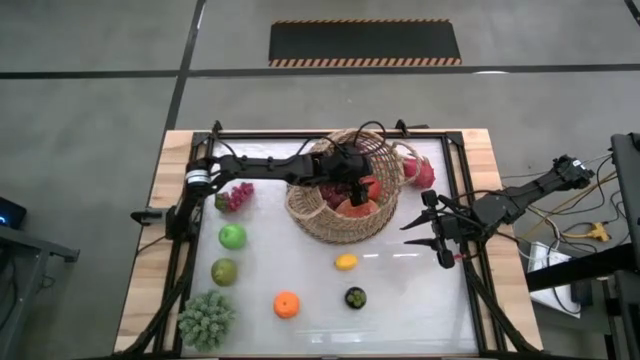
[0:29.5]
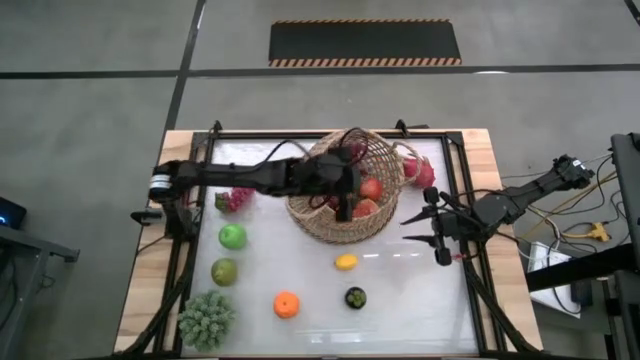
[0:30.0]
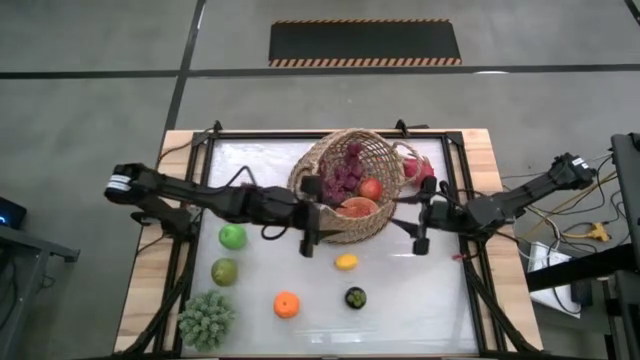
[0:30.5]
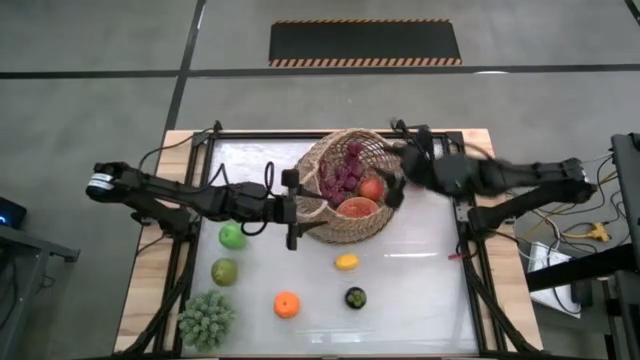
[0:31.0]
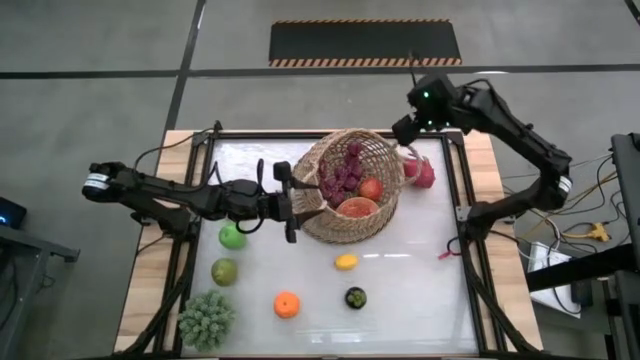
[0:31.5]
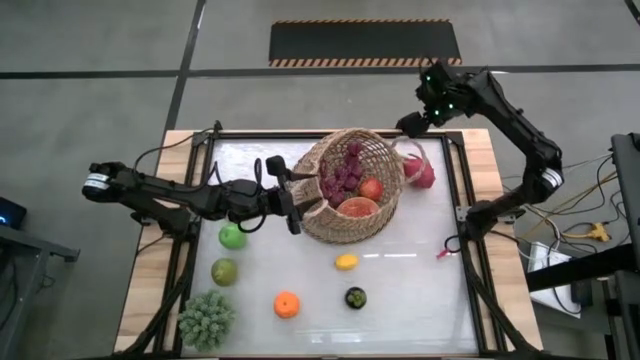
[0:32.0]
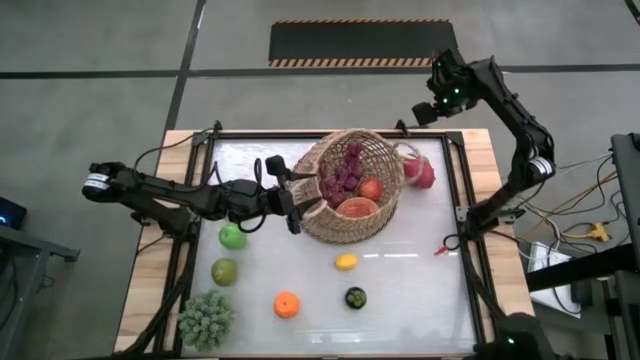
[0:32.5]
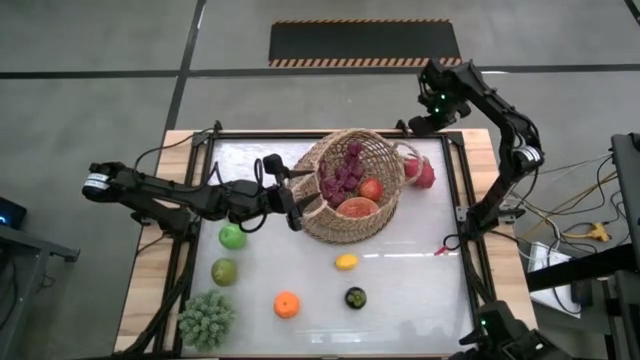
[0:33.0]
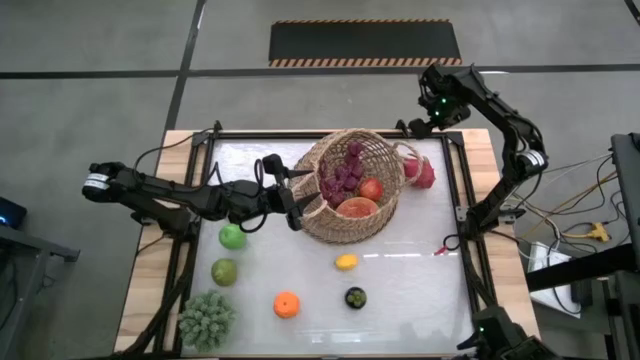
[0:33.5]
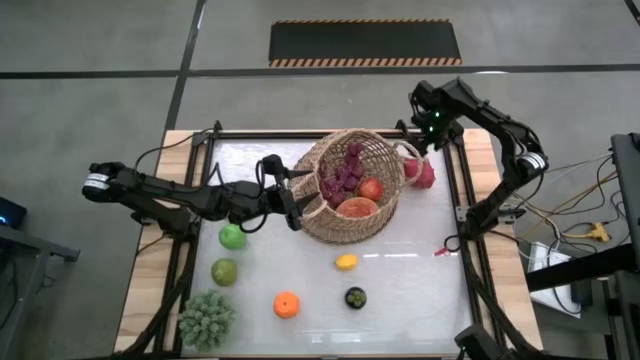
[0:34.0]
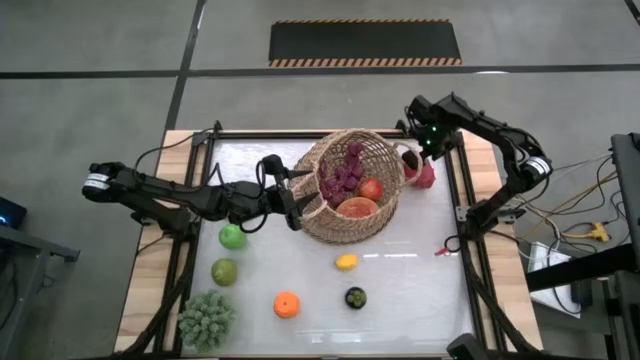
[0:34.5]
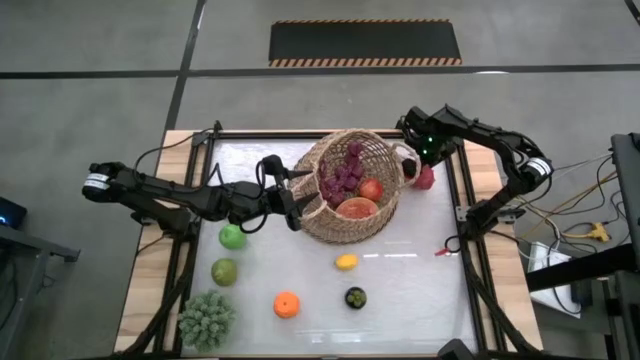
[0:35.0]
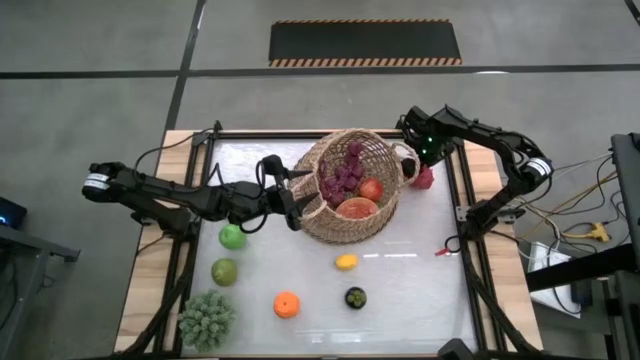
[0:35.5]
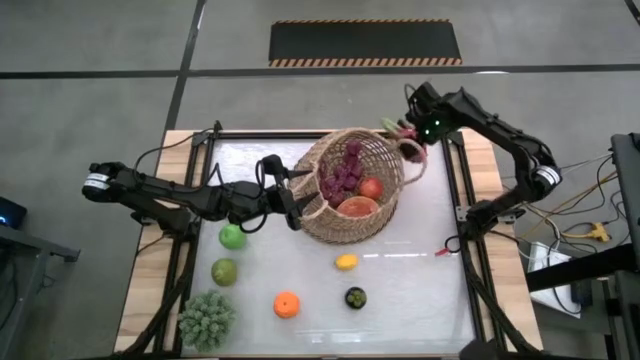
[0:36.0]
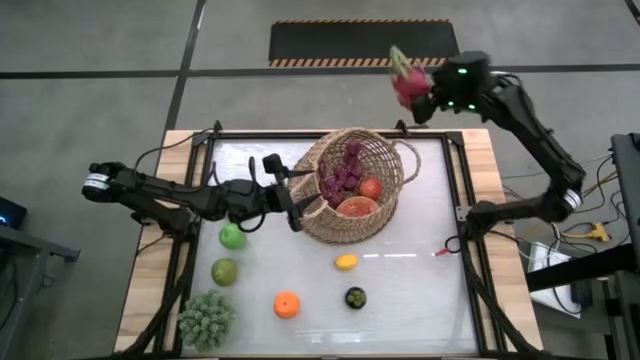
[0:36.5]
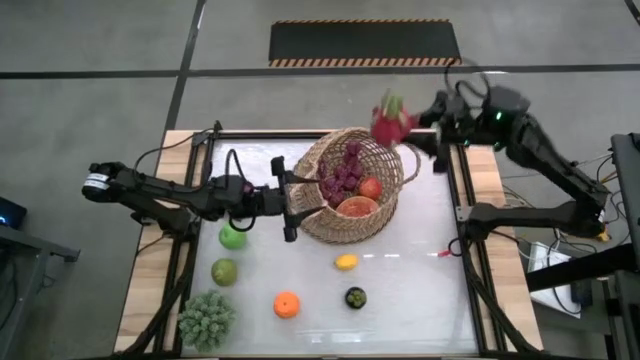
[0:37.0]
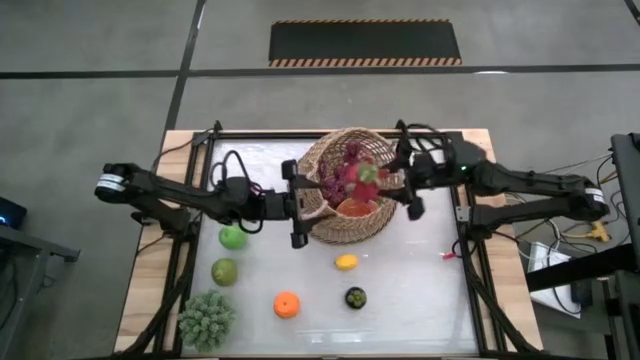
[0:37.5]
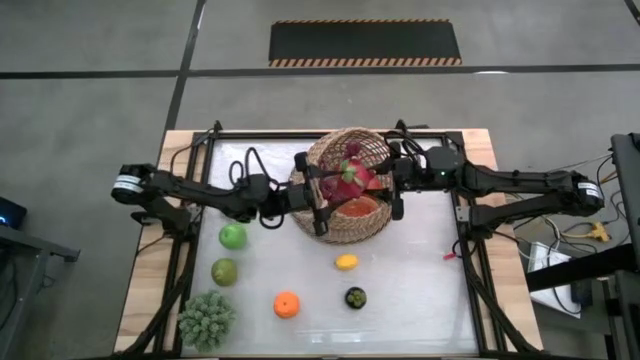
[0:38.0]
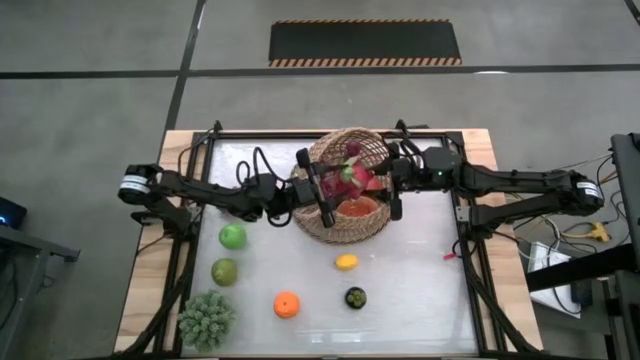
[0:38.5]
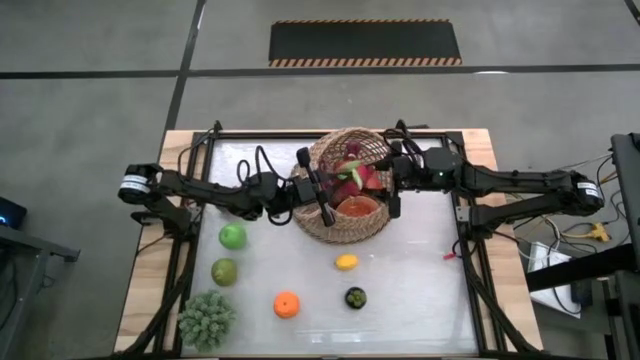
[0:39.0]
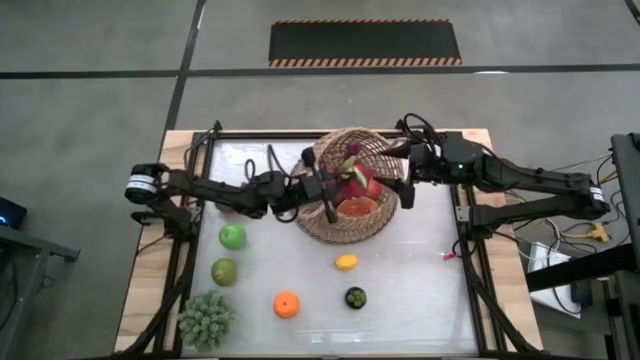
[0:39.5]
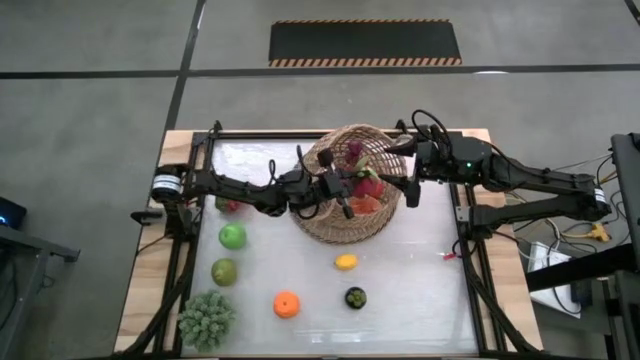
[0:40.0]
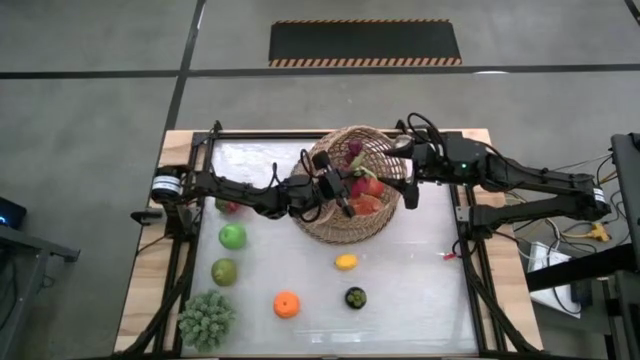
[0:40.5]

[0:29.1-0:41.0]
Task: Build produce basket
Put the pink dragon fruit into the brown basket

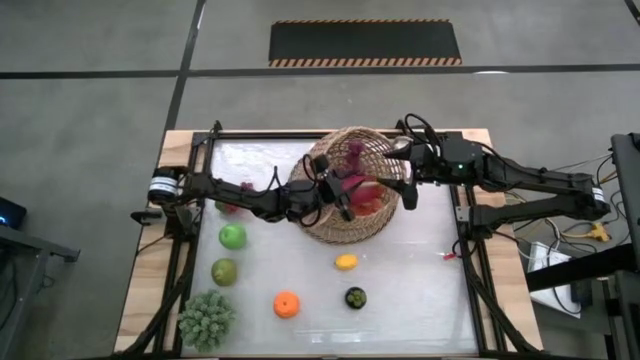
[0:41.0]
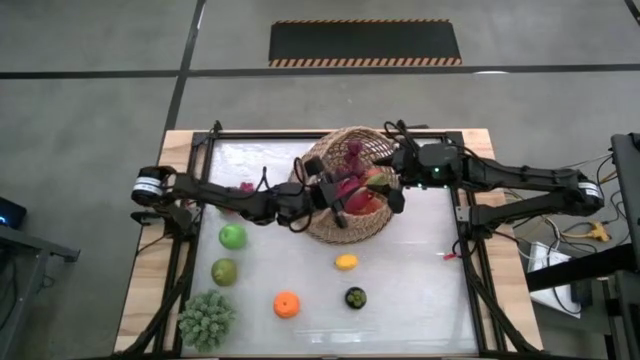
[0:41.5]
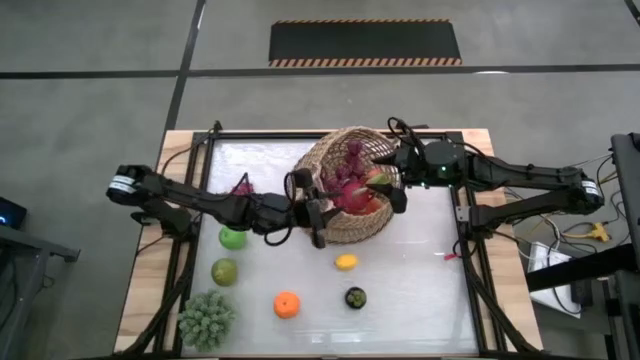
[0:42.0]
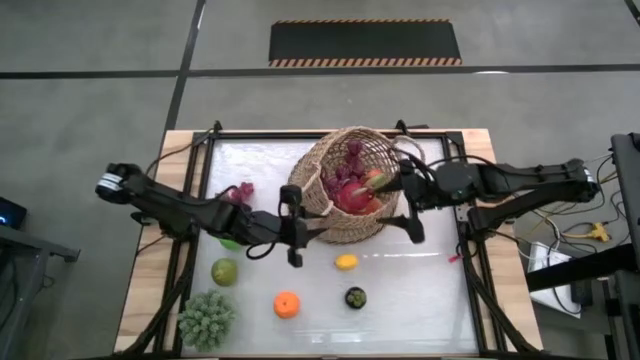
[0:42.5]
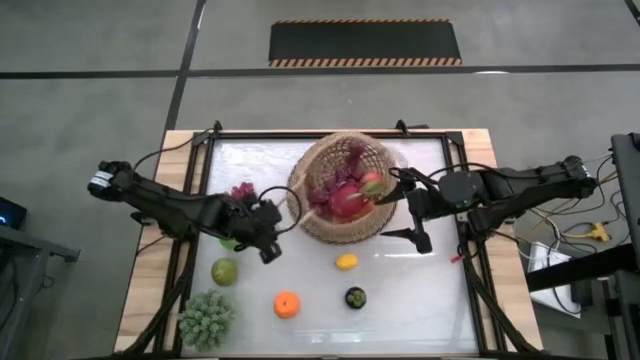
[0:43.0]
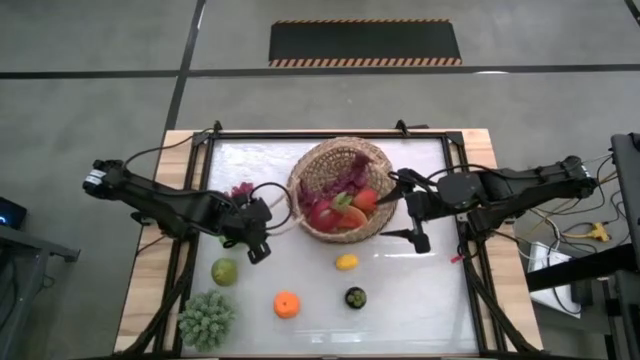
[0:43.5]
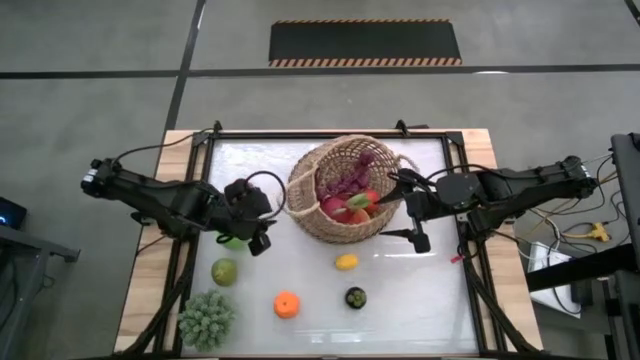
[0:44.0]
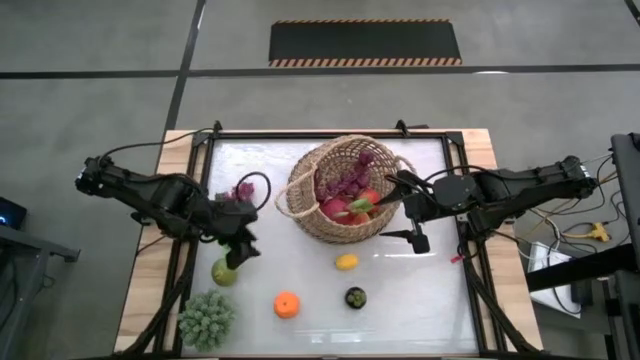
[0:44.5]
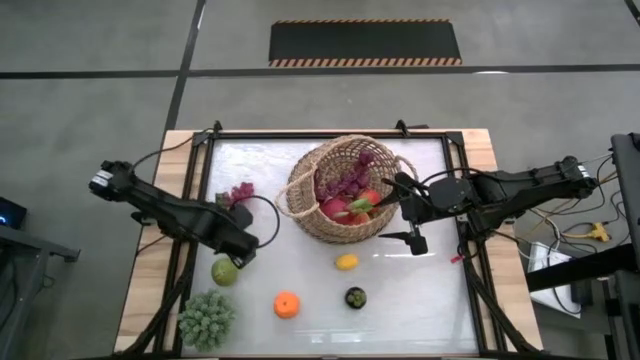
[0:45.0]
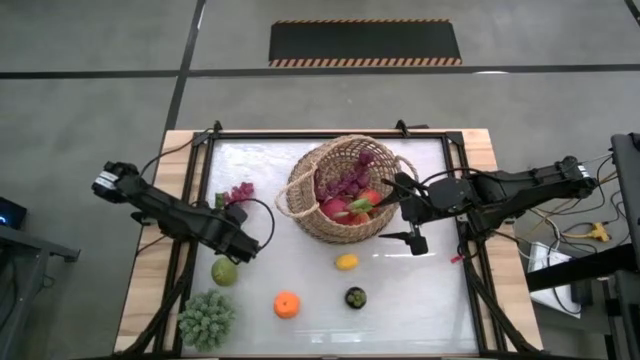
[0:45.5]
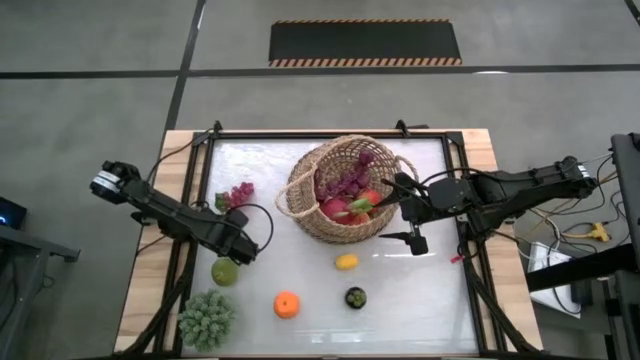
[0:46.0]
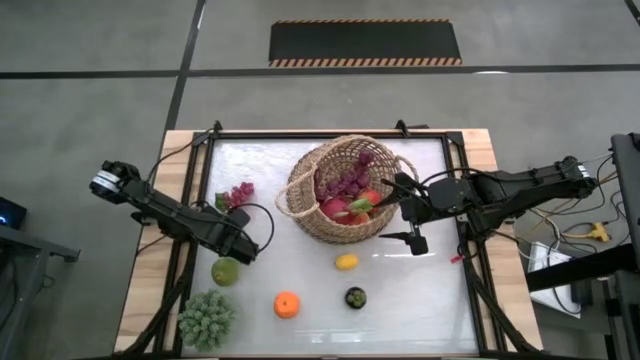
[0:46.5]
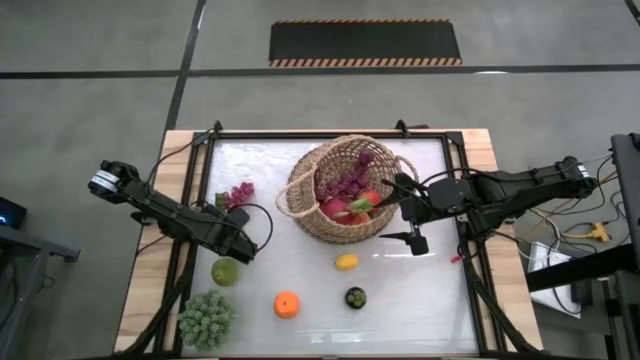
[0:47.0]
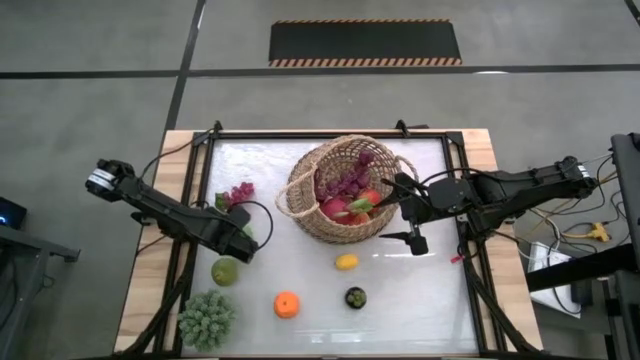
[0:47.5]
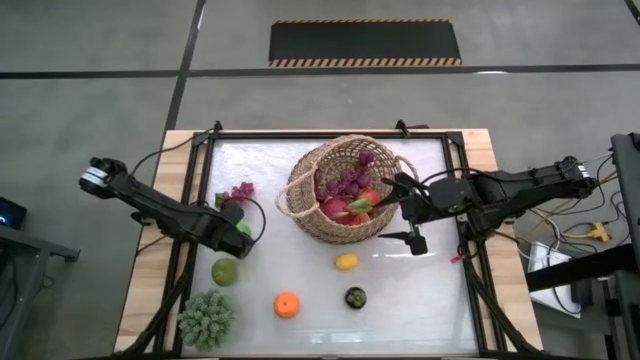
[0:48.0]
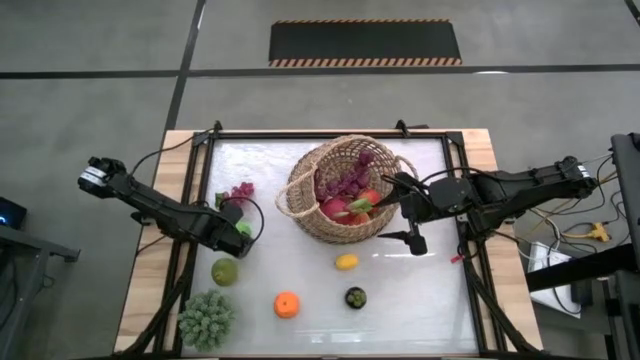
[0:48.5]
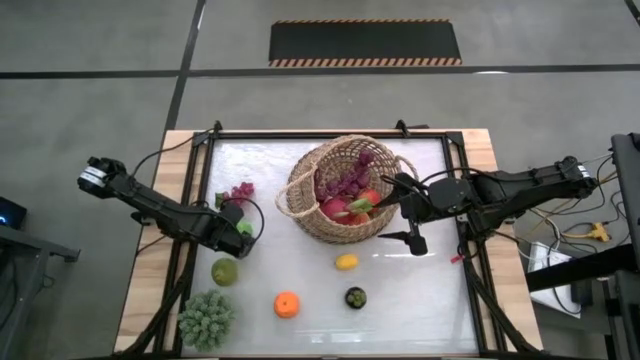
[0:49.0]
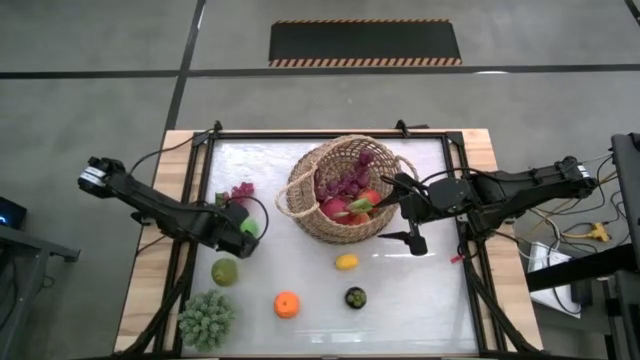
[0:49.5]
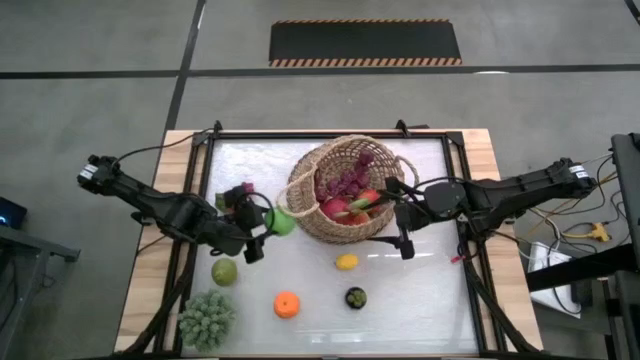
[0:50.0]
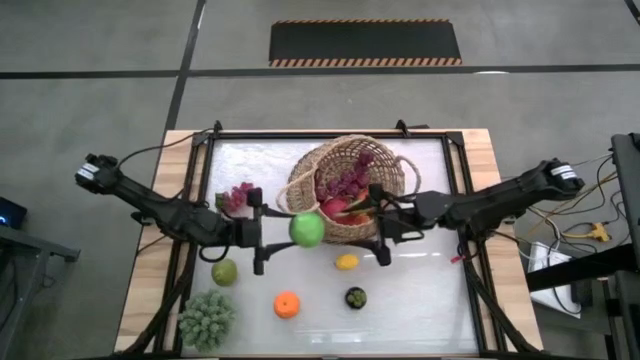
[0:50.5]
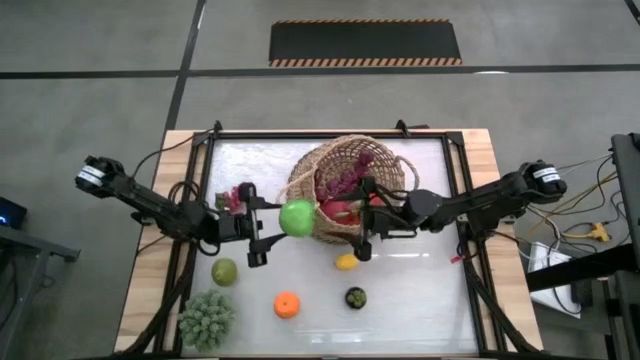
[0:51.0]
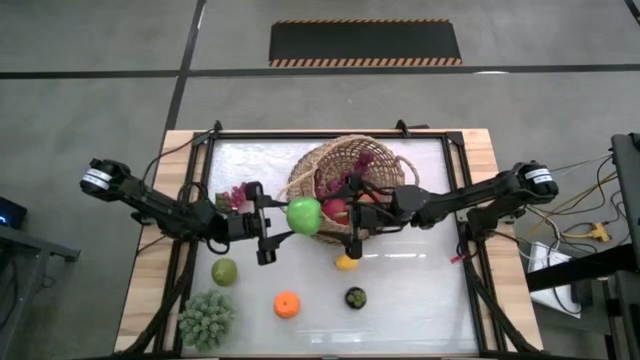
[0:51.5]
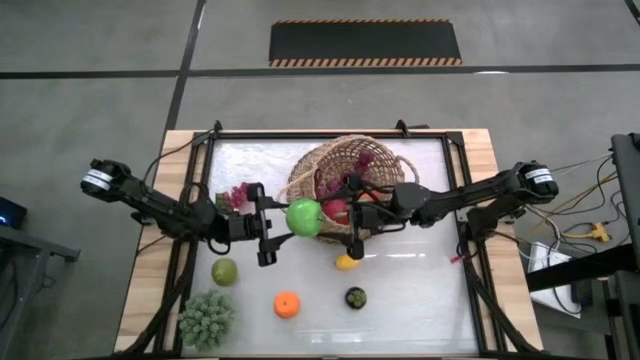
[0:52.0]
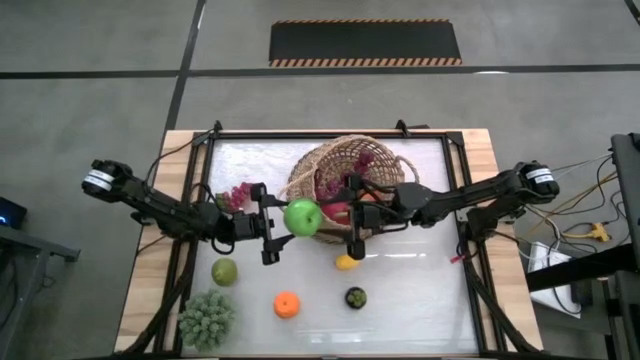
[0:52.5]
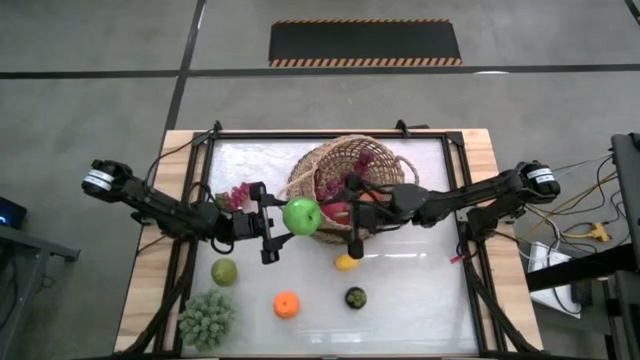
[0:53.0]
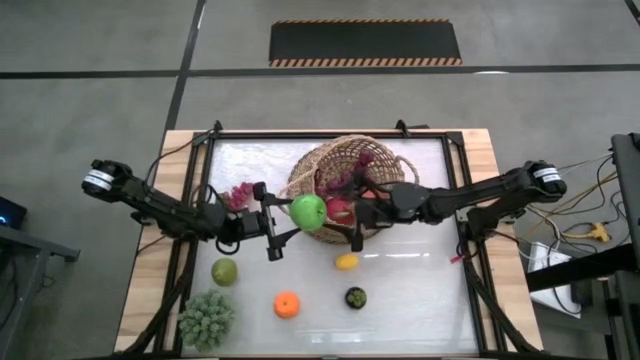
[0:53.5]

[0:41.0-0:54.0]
Put the green apple into the brown basket
